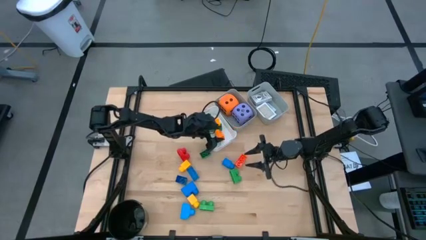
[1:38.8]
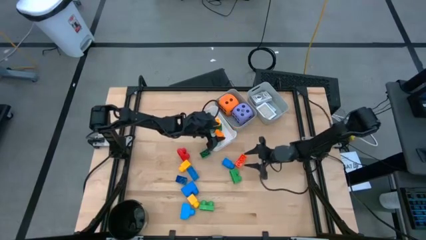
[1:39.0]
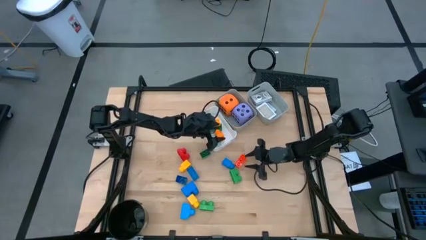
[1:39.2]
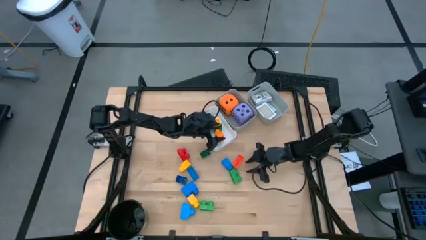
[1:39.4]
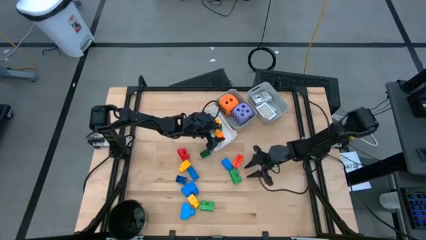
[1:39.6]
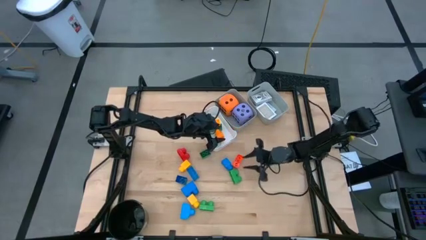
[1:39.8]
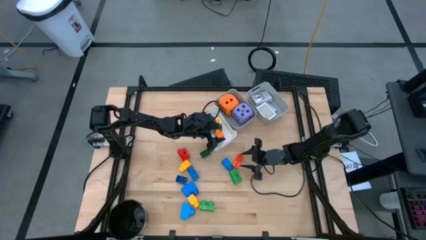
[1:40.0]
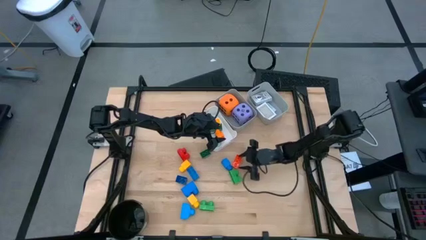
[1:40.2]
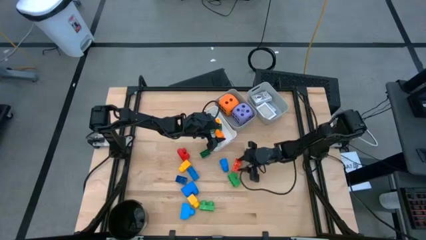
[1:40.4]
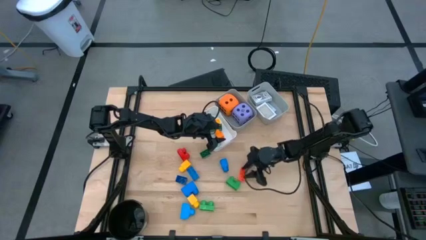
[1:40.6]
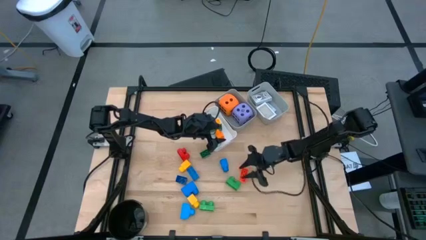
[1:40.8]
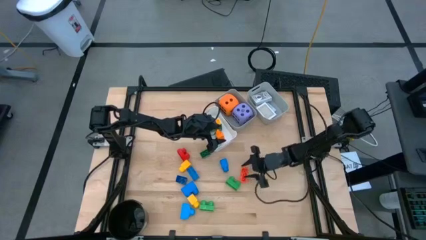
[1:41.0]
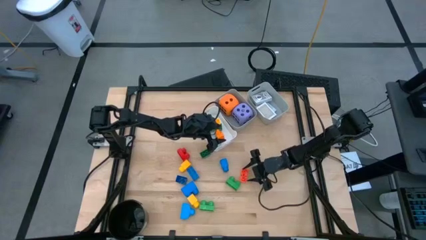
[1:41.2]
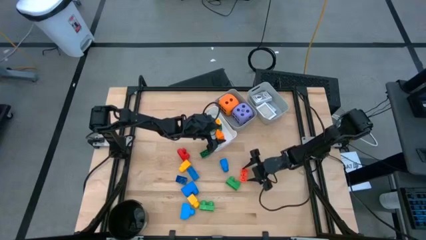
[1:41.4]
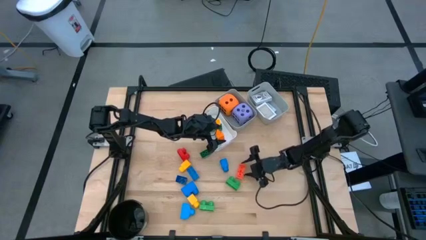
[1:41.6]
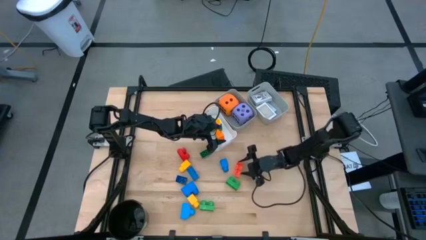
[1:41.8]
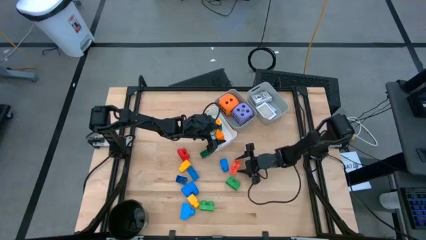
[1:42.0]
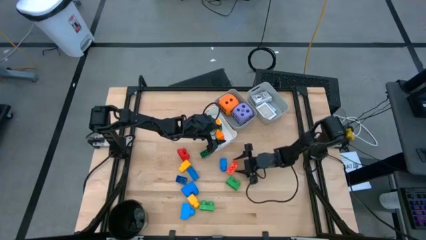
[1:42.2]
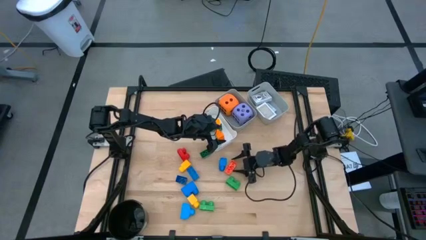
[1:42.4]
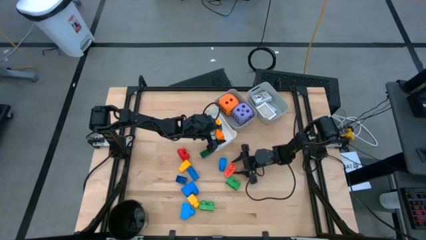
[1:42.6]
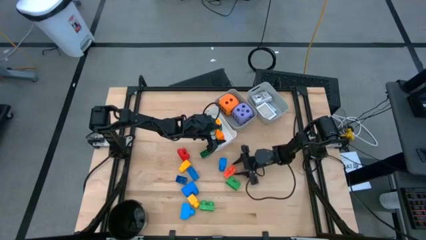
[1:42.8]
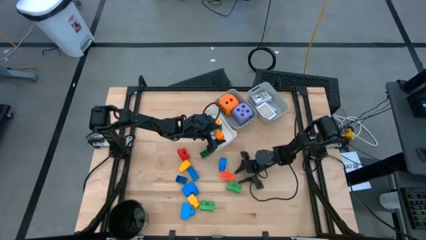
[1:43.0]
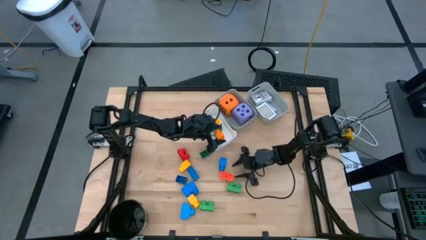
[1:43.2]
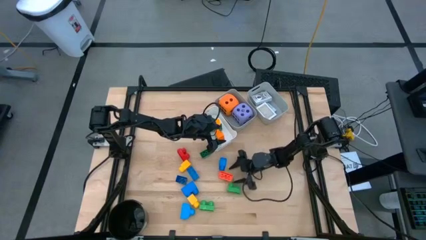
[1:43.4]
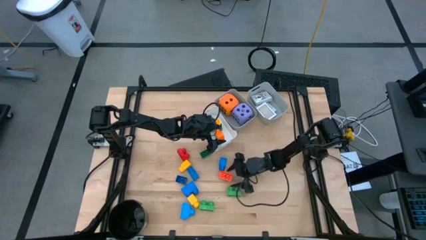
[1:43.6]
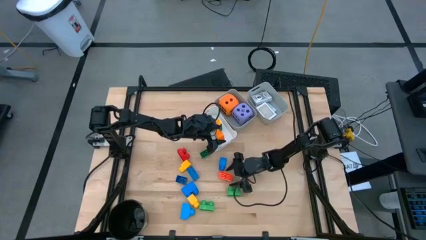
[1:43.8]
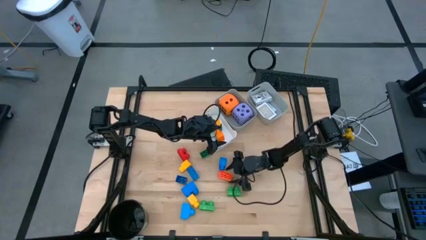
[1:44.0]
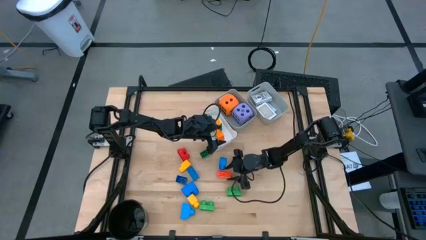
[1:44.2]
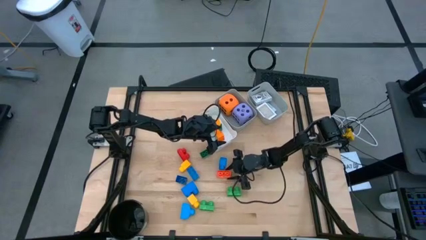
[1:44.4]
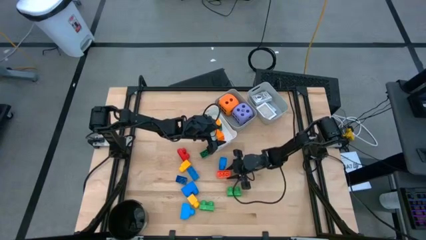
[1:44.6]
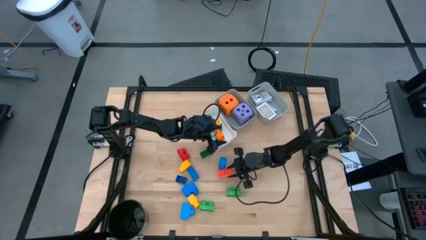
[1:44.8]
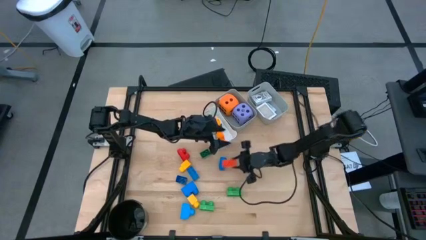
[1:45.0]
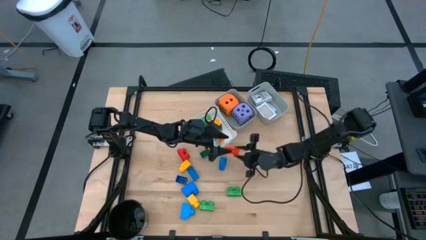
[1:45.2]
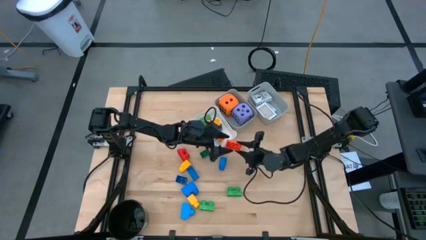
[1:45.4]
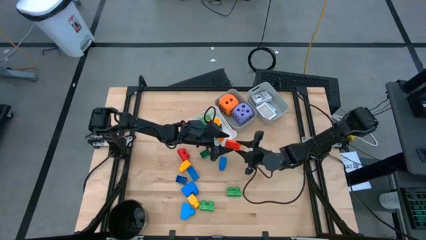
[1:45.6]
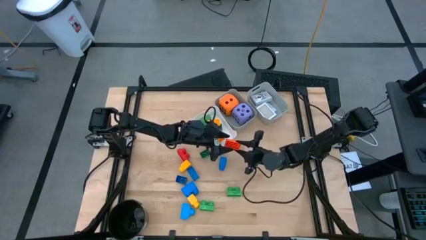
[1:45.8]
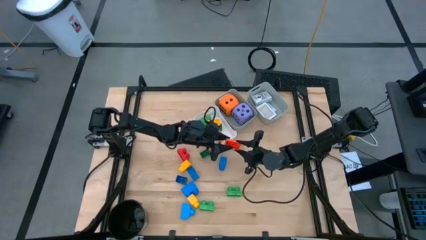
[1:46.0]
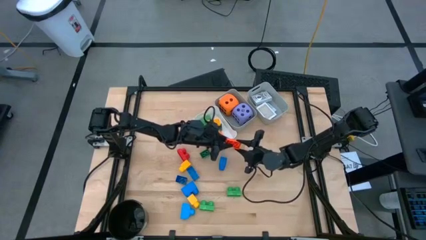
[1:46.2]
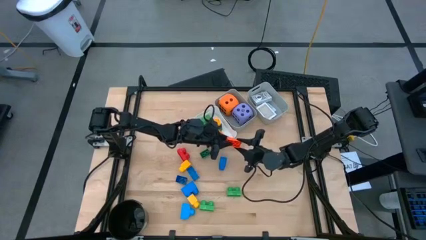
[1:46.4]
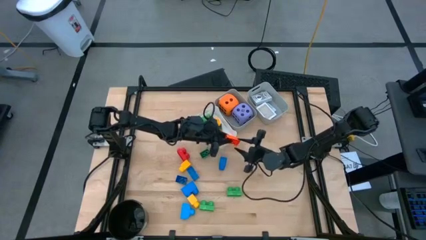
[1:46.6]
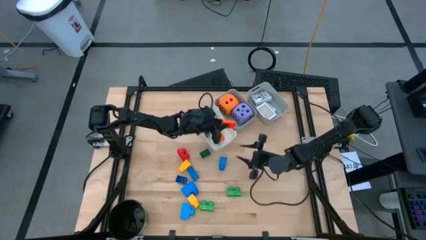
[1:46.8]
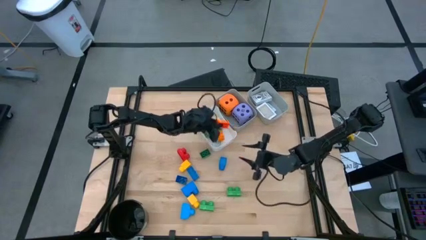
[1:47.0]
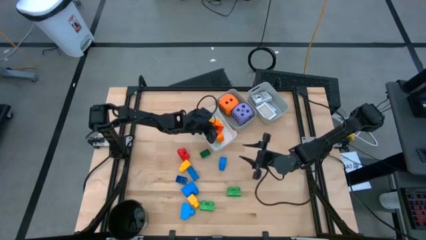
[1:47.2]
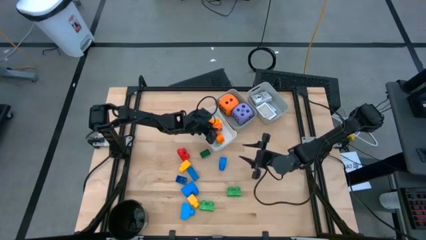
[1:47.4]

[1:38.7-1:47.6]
Task: Pick & Place Toys
Put the orange game piece into the white bin

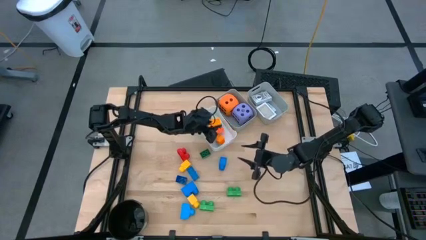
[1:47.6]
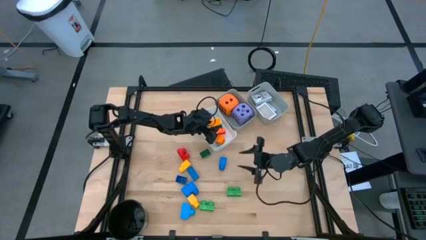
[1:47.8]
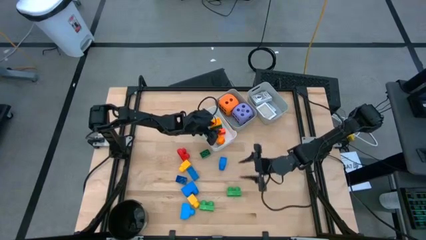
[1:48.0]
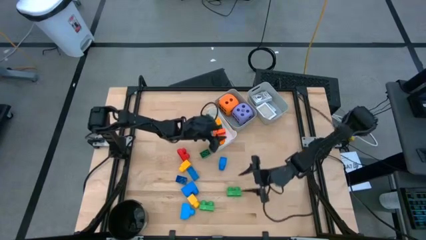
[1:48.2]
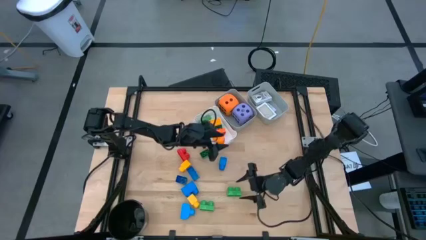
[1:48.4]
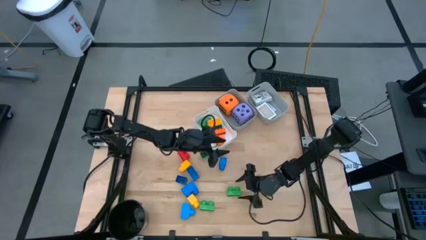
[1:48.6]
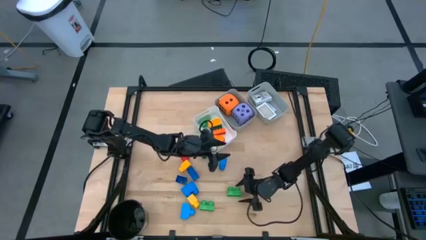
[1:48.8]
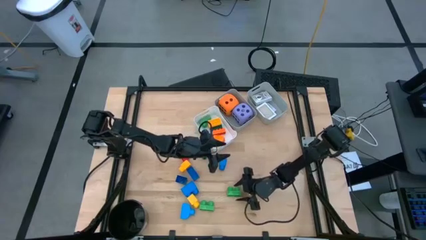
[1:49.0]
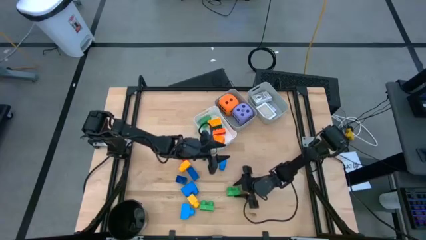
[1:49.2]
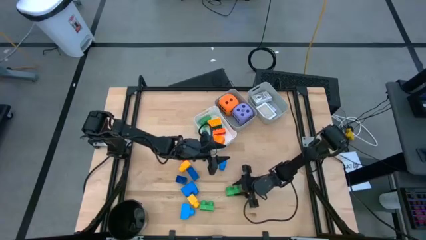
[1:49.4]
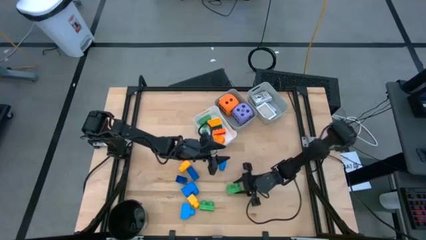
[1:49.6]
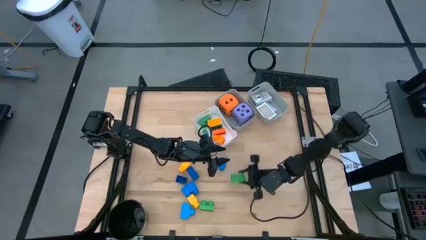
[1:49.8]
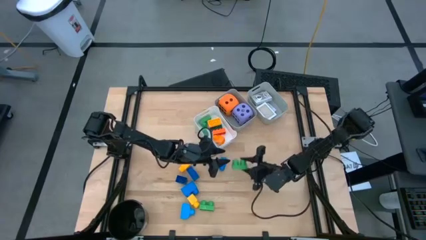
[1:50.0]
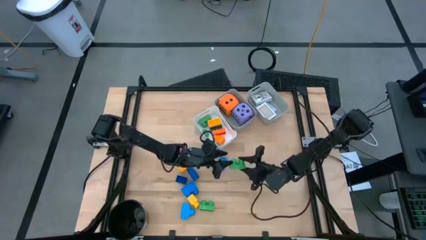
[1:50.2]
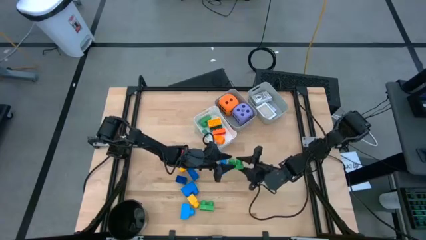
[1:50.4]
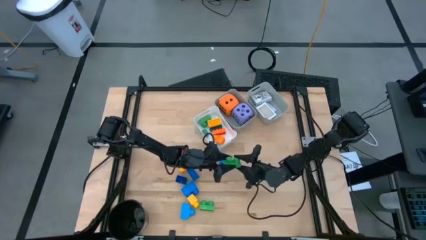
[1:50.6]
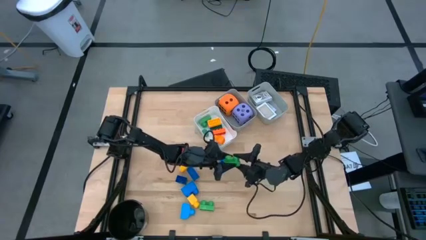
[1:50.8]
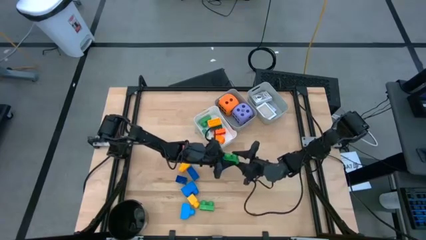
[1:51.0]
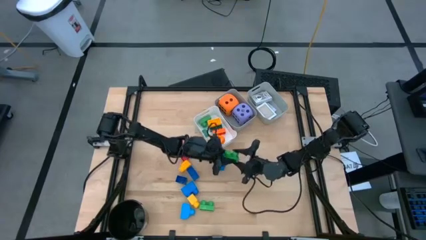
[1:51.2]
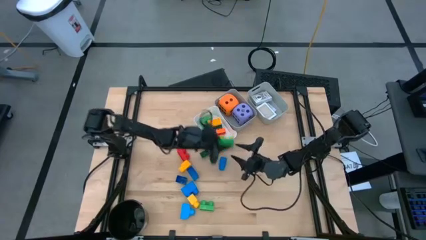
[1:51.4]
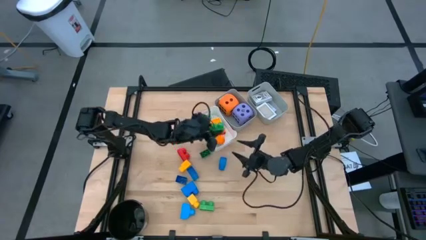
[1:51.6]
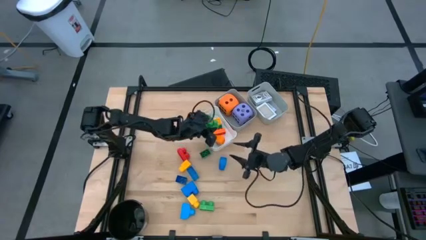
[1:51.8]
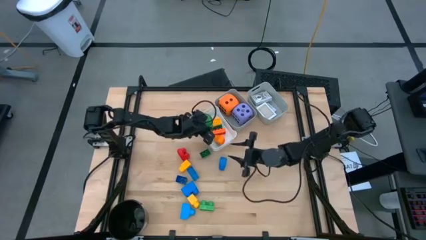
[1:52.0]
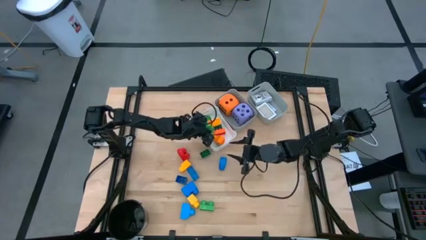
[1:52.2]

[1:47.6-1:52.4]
Put the green game piece into the white bin

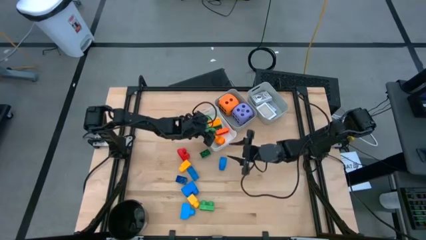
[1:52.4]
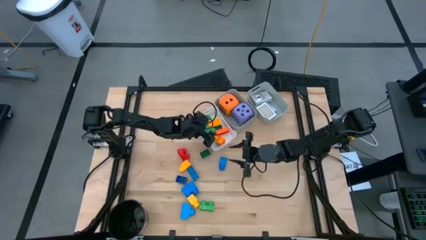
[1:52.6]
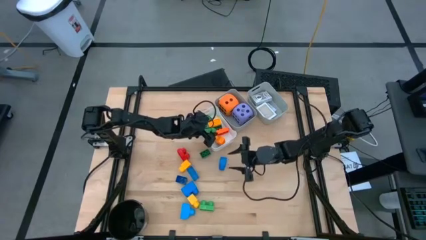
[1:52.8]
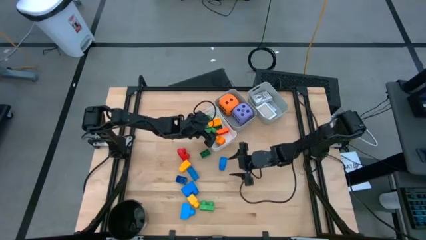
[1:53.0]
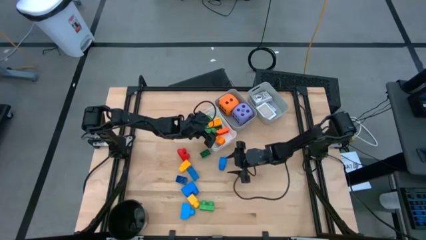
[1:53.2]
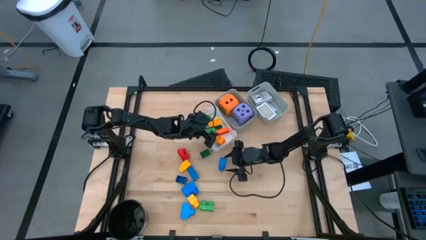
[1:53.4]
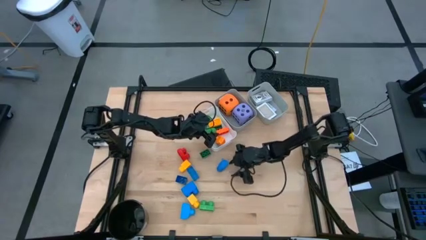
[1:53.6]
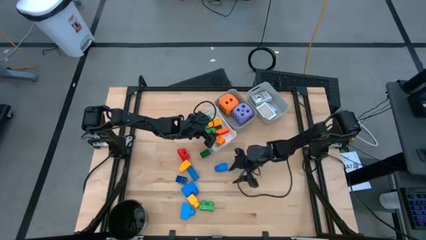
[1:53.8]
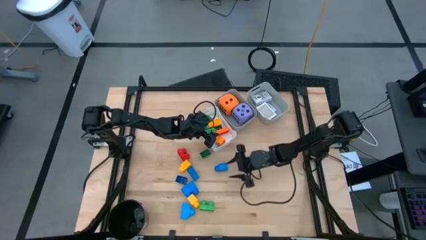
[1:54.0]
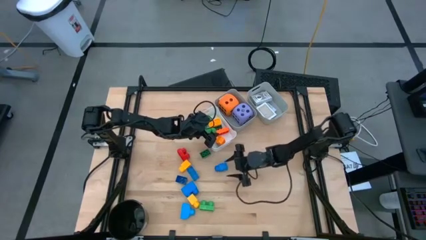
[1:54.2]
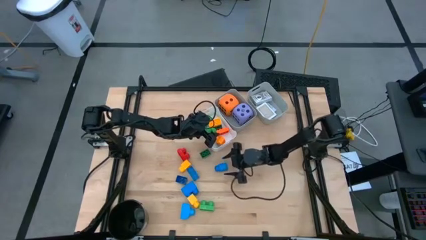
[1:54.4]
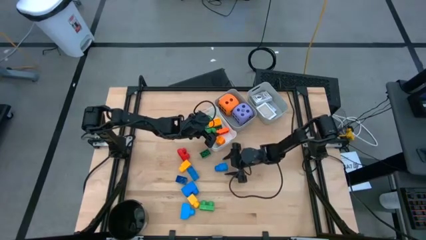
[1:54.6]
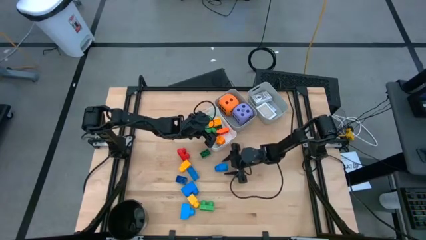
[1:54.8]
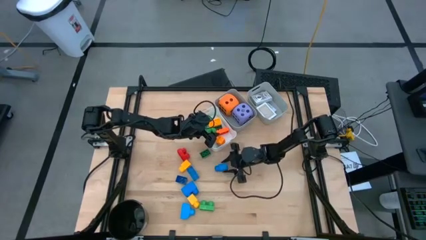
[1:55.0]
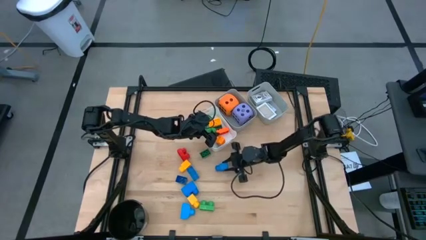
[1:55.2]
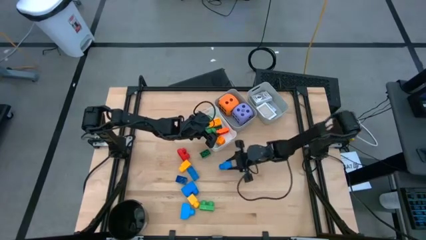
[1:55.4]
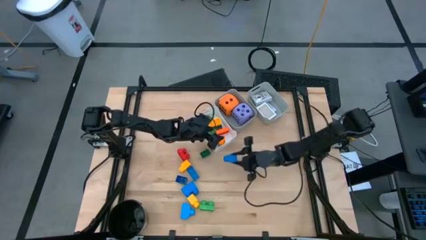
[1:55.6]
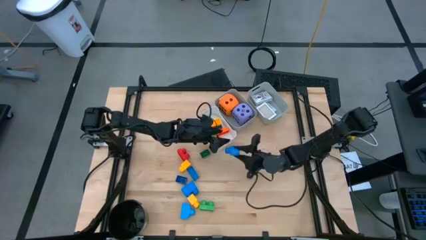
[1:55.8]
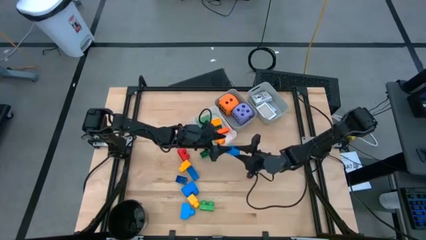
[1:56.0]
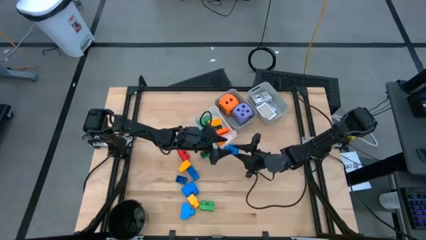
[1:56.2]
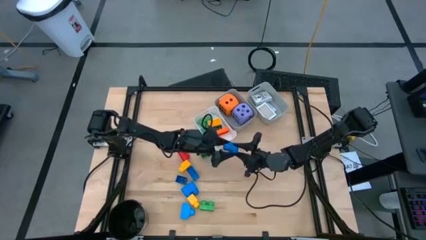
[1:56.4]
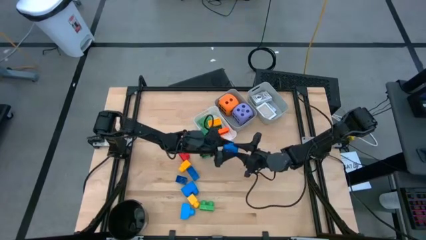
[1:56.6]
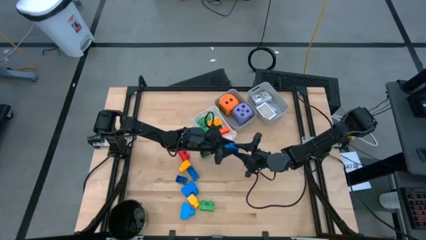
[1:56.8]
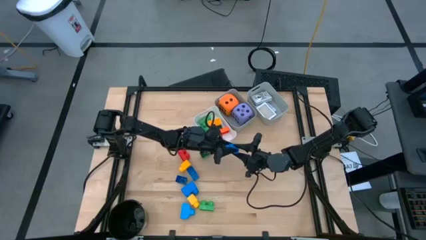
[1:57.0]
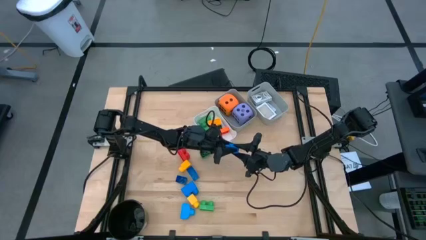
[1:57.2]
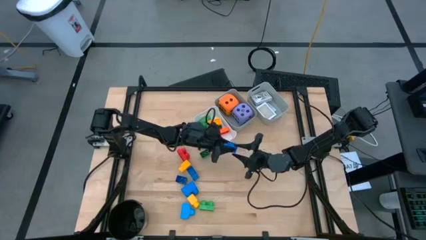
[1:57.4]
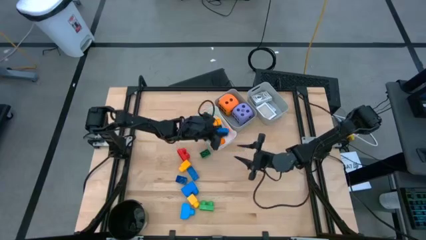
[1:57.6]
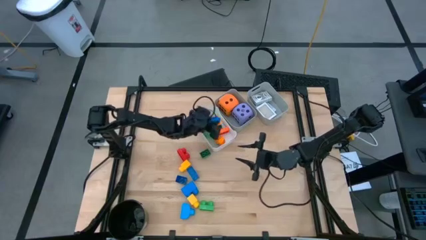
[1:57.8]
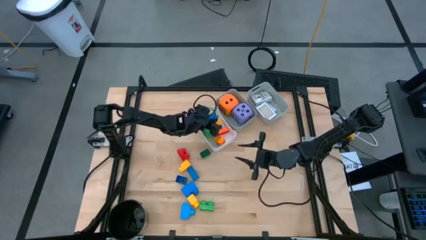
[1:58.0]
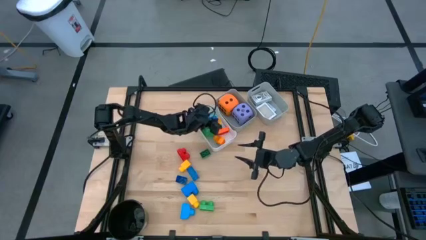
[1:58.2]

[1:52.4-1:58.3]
Put the blue game piece into the white bin
